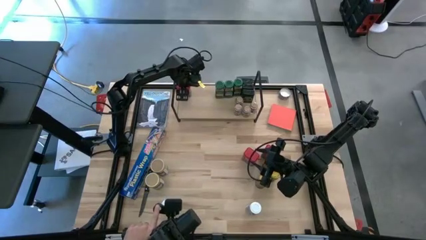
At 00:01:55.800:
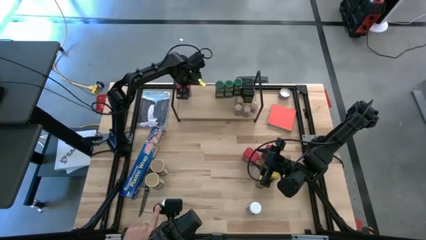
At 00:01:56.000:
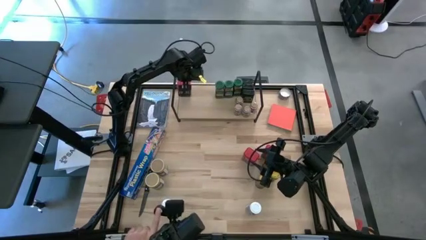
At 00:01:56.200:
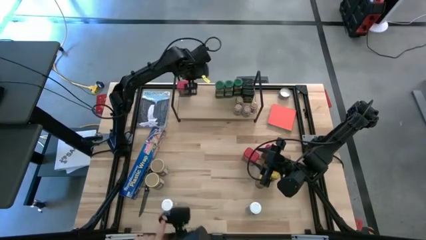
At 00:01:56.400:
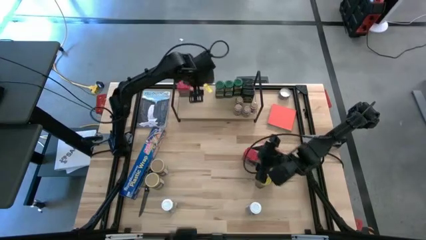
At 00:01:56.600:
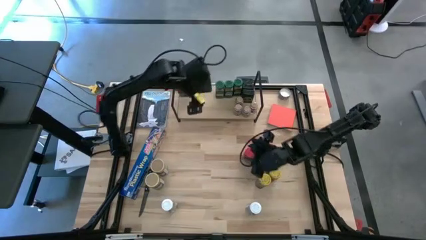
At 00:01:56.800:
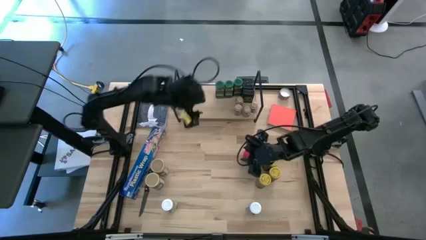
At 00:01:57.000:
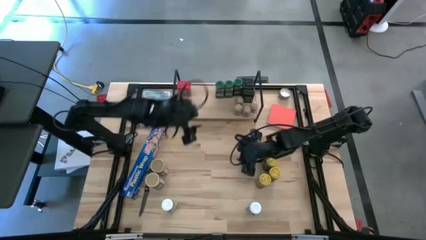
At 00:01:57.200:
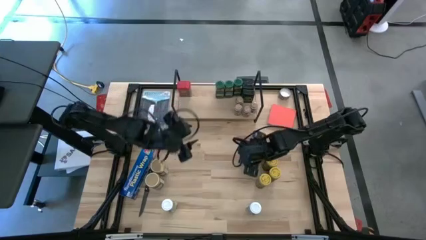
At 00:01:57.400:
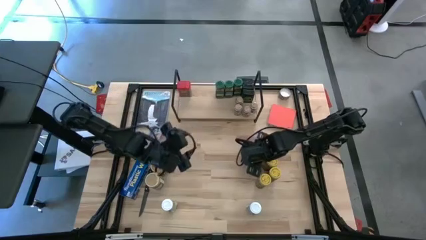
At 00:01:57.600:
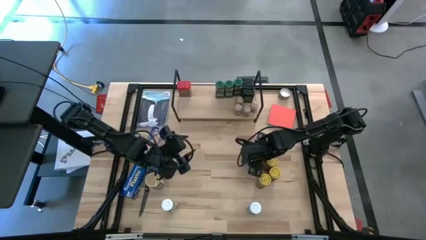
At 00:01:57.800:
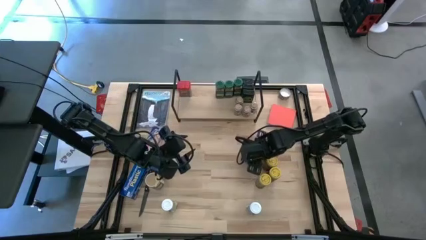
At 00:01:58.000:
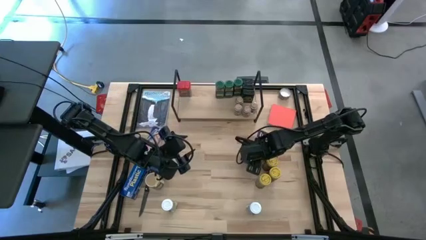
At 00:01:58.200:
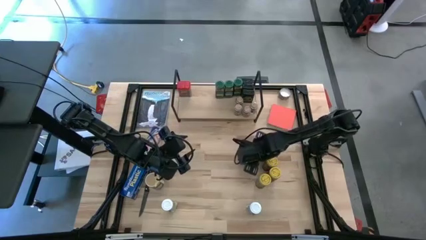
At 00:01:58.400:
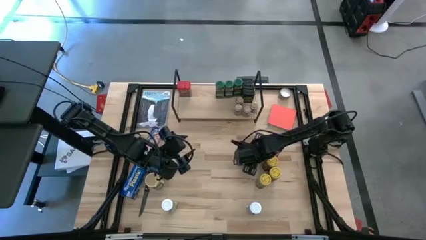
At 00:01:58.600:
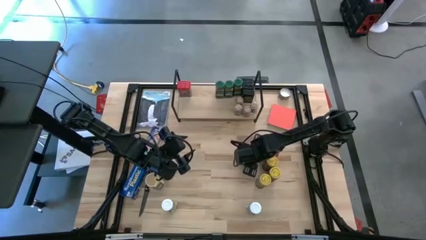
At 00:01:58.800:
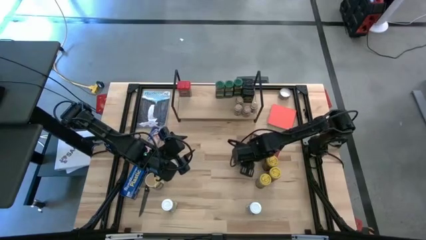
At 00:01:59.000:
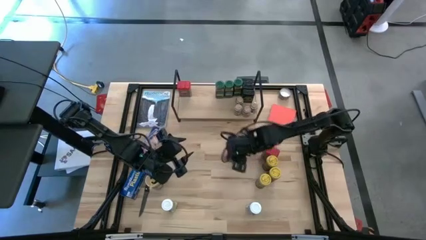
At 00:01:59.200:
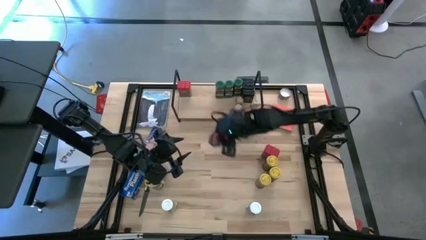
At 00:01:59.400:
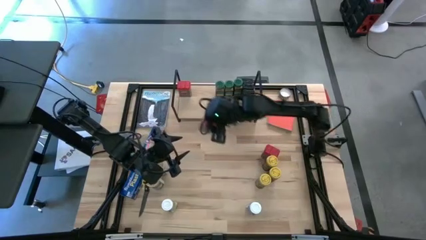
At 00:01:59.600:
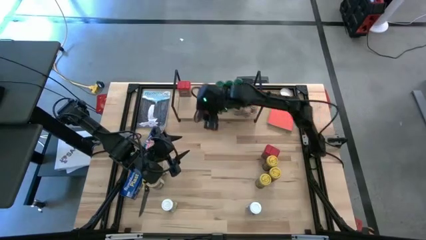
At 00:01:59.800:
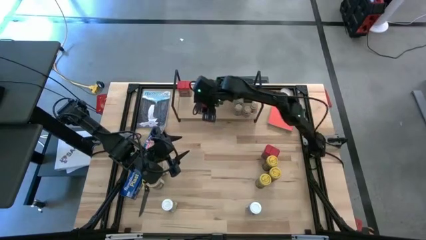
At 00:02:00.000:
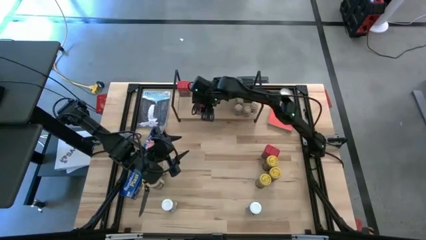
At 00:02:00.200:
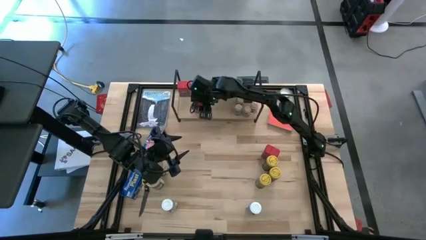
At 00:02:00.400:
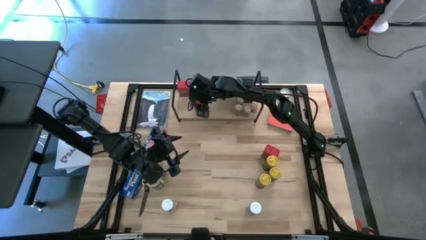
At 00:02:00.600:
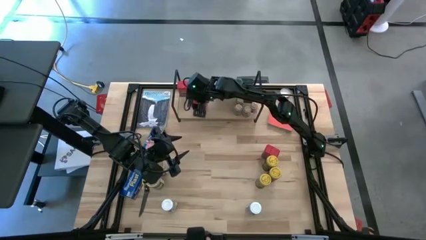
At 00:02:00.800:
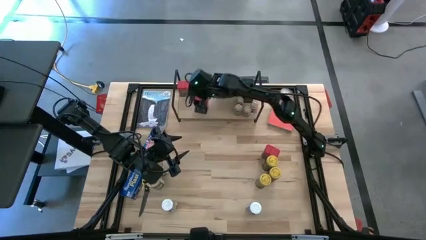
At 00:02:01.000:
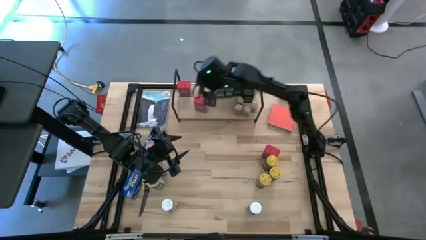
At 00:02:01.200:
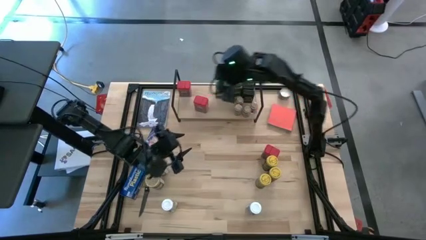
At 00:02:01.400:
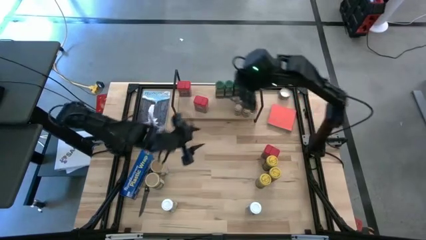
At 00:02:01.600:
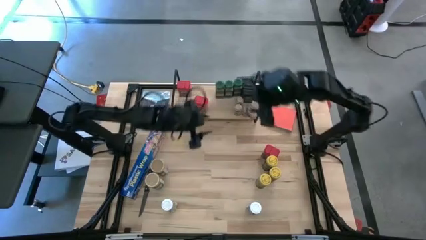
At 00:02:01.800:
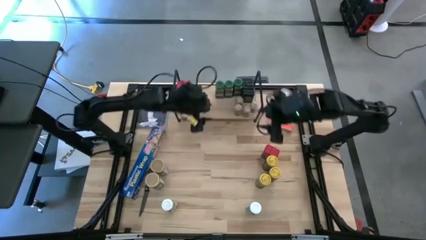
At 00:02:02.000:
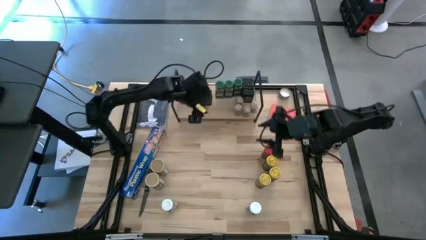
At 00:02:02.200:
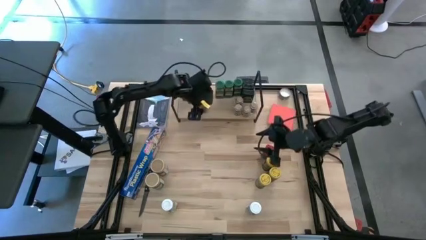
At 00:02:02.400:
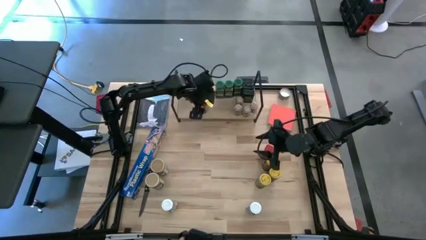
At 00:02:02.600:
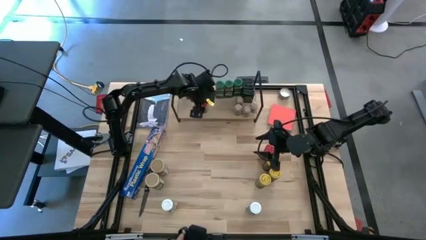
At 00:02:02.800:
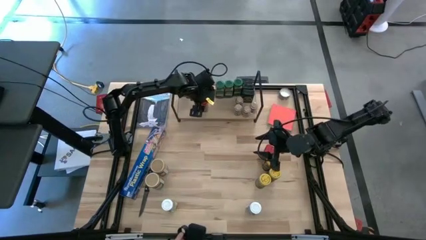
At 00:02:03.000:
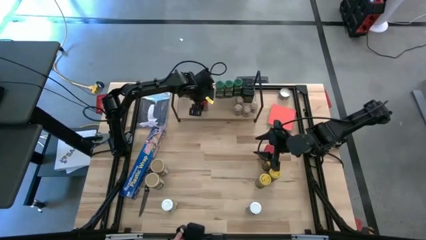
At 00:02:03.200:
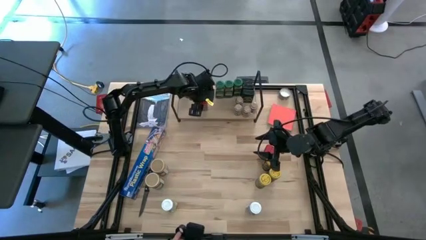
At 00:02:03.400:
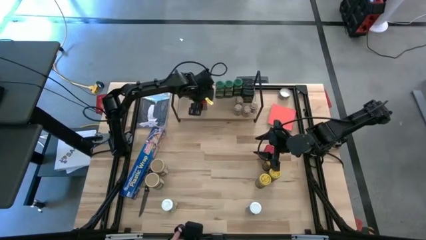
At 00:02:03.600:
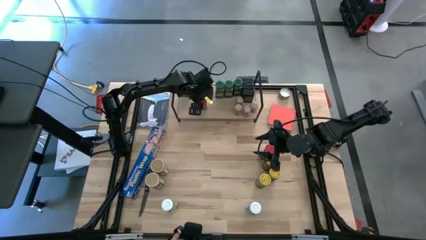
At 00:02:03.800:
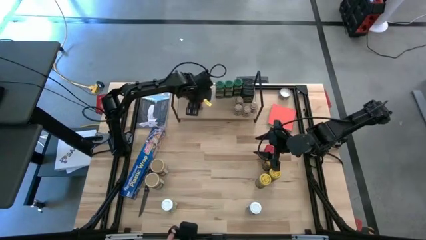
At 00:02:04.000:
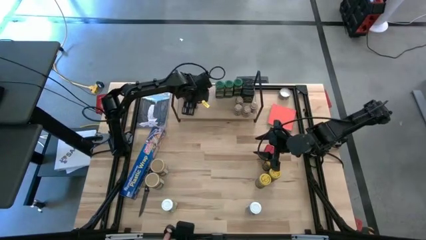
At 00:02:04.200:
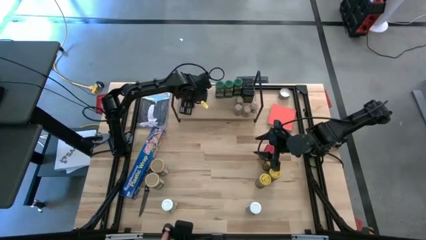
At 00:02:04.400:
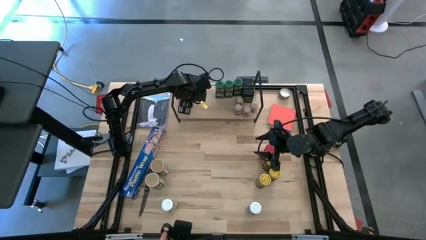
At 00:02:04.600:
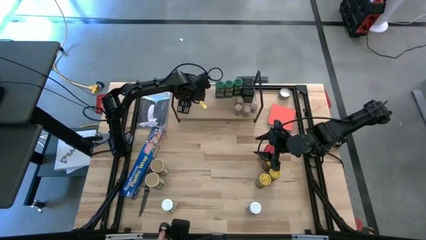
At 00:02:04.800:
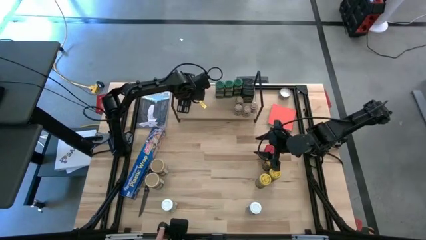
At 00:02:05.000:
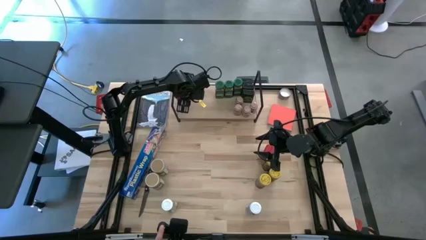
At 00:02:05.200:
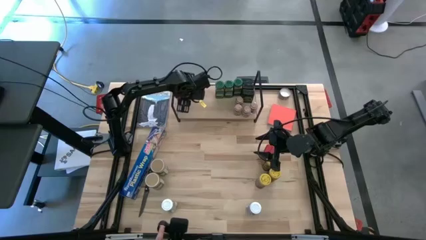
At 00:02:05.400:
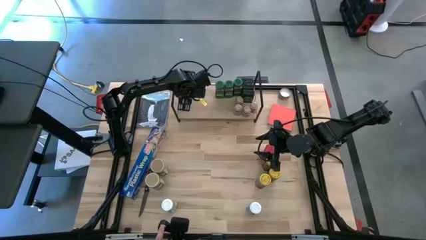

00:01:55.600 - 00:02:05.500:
Task: Shelf spices
Put the red seasoning can on the shelf aligned with the red seasoning can

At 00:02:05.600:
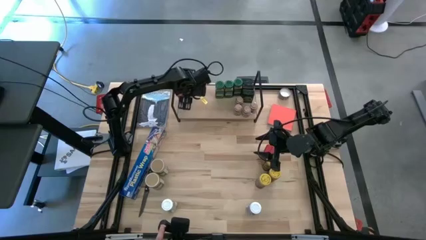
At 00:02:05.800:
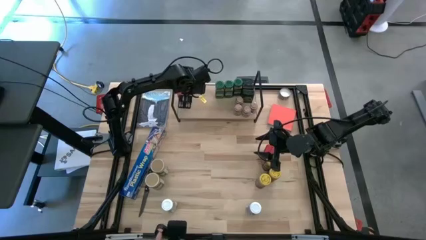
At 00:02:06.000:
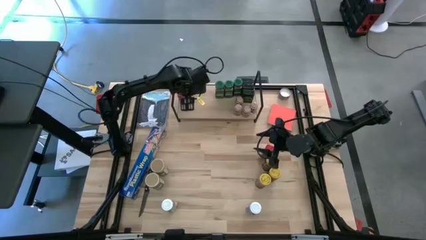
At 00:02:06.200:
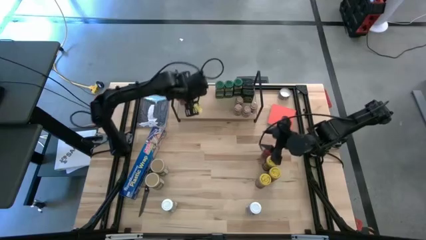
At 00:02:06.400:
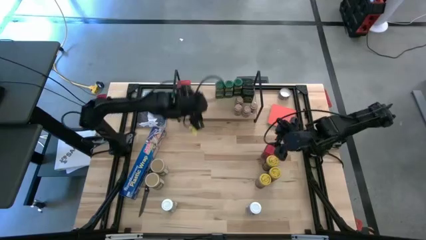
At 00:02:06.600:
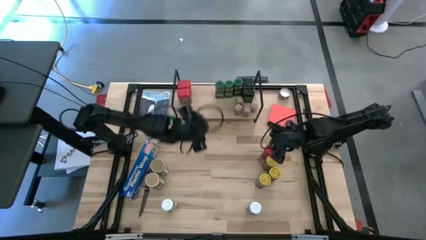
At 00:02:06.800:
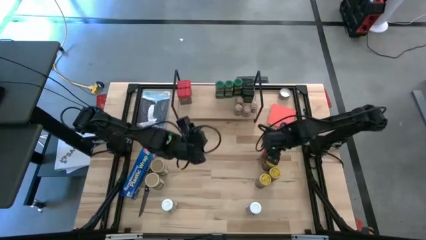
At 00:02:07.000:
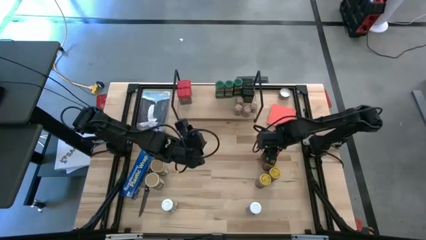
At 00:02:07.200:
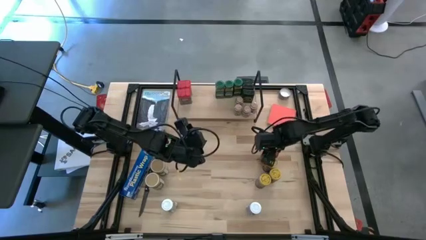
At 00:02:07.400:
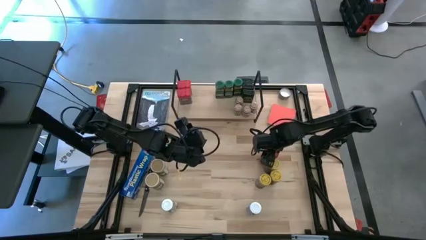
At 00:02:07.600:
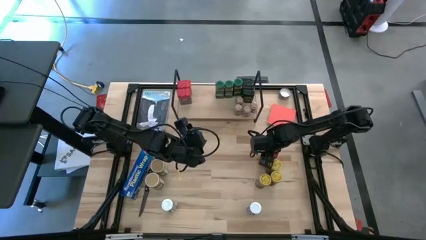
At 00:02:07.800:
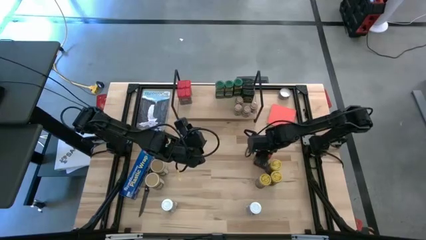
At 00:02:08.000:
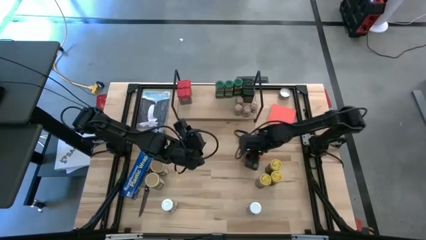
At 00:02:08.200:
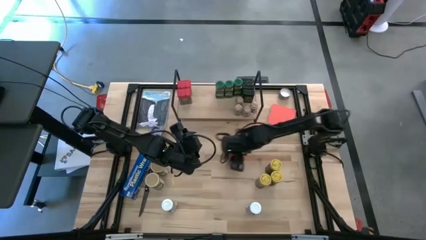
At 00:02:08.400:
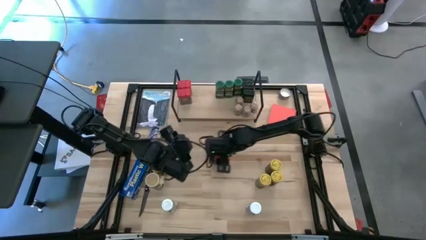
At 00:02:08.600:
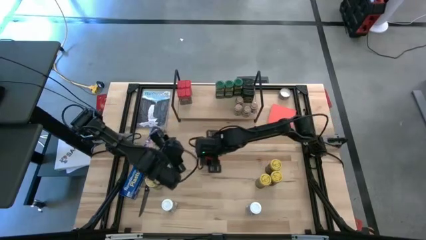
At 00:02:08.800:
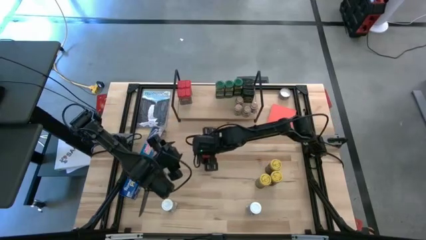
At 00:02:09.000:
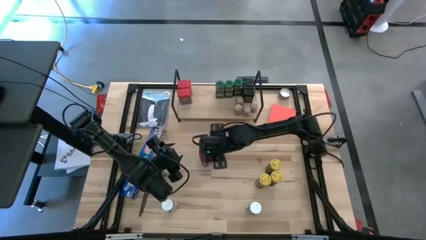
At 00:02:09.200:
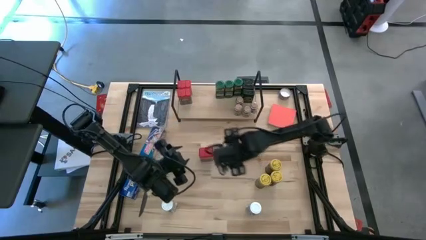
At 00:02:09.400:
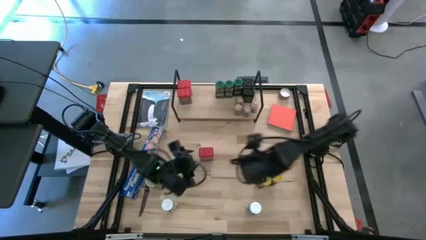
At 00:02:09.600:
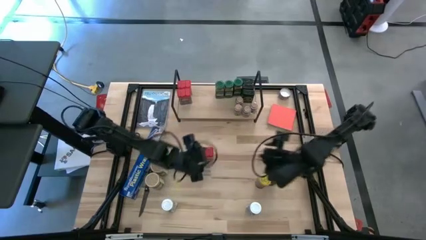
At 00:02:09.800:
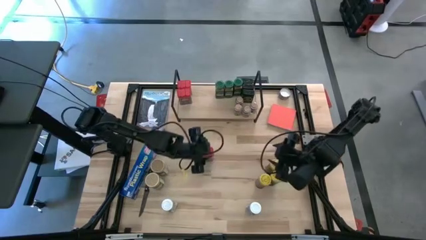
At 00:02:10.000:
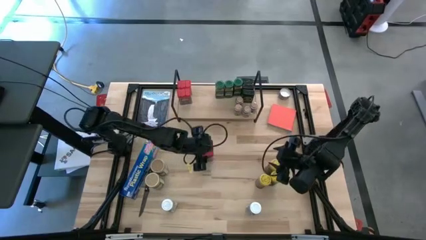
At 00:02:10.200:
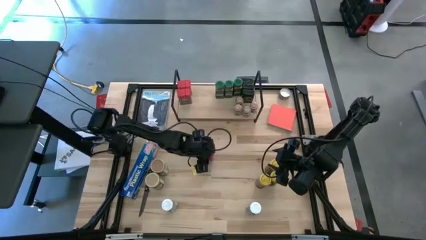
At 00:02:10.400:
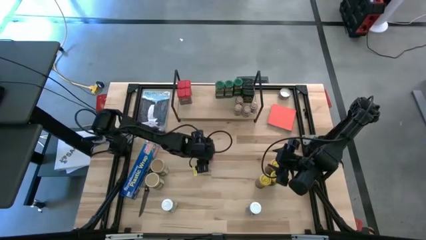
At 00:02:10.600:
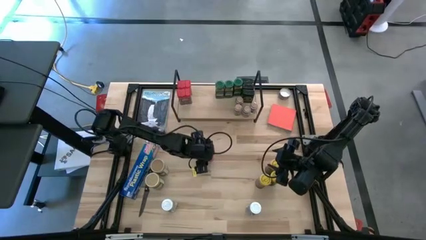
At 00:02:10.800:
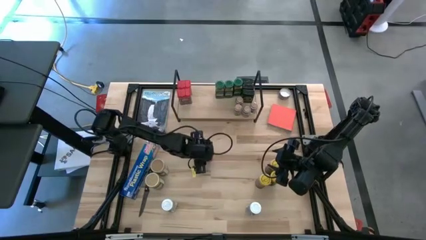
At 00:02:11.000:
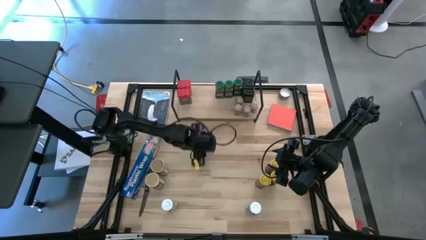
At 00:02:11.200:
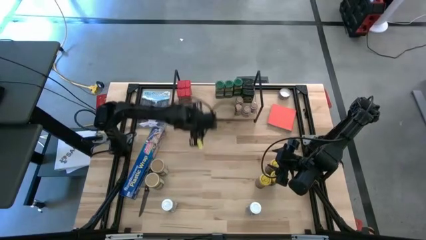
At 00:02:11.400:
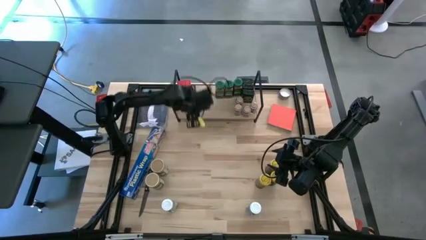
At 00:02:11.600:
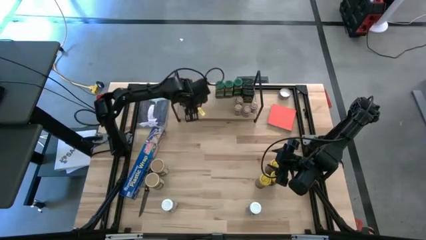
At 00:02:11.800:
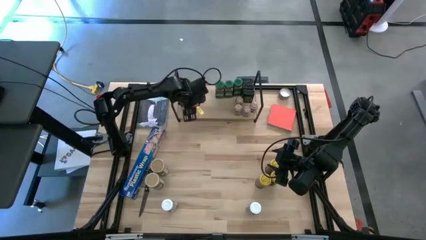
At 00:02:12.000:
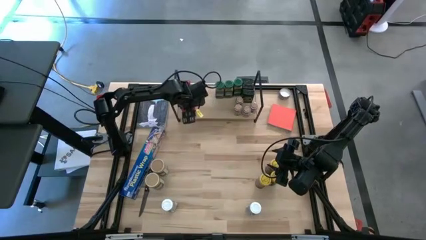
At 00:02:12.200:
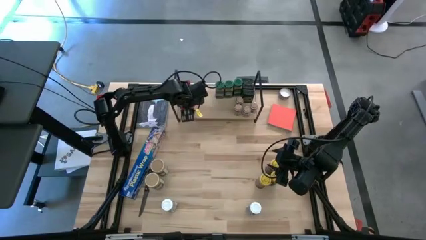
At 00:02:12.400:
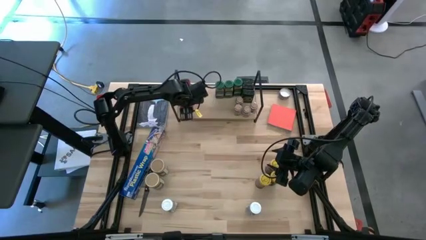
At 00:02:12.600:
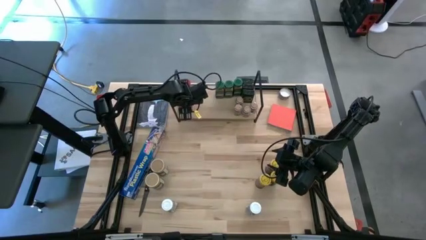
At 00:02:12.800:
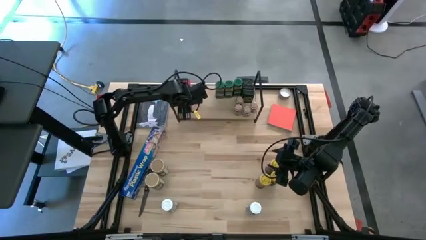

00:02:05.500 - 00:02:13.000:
Put the red seasoning can on the shelf aligned with the red seasoning can
